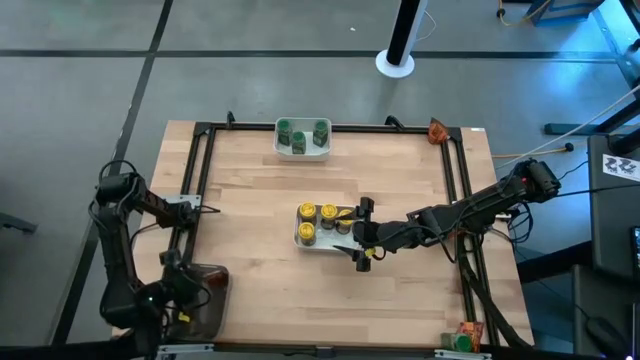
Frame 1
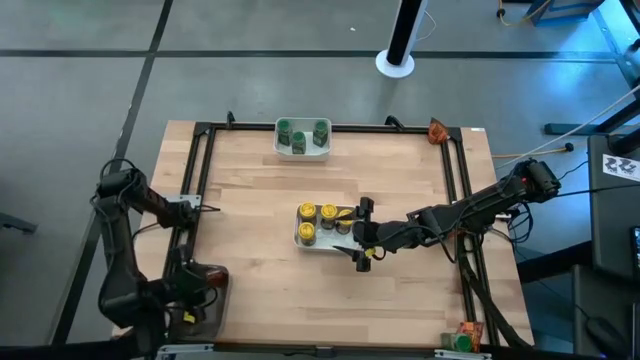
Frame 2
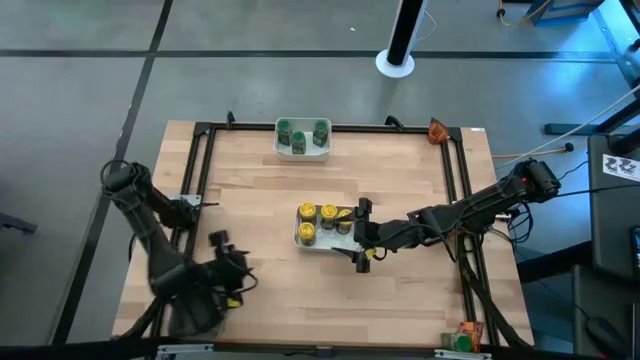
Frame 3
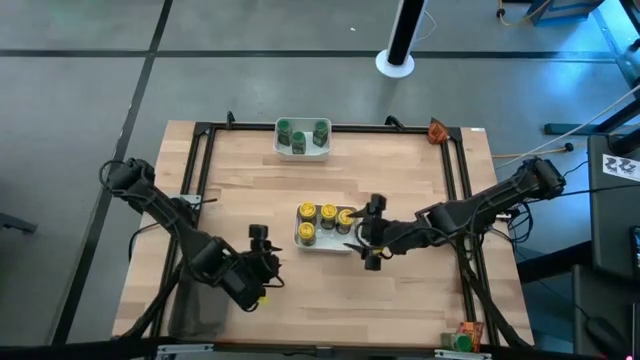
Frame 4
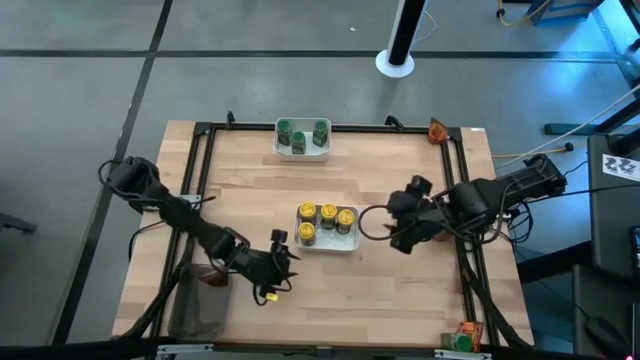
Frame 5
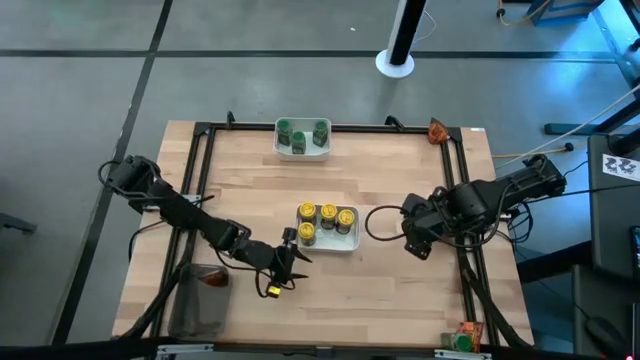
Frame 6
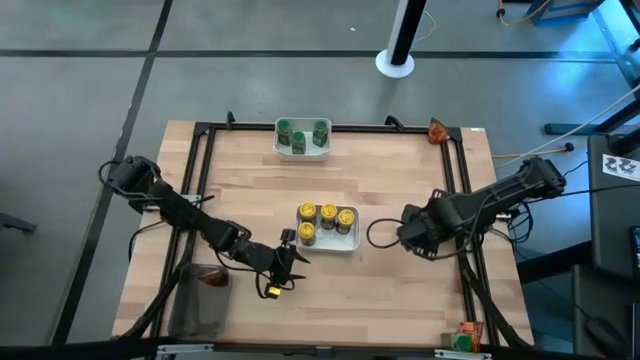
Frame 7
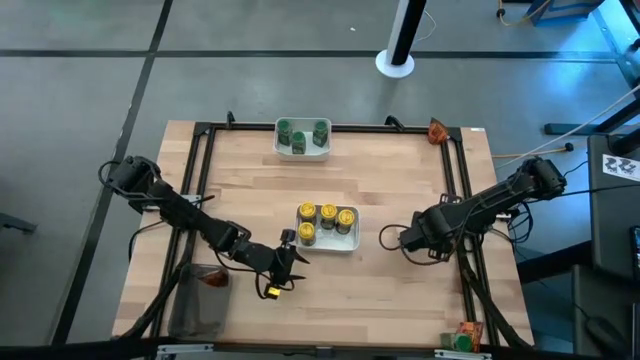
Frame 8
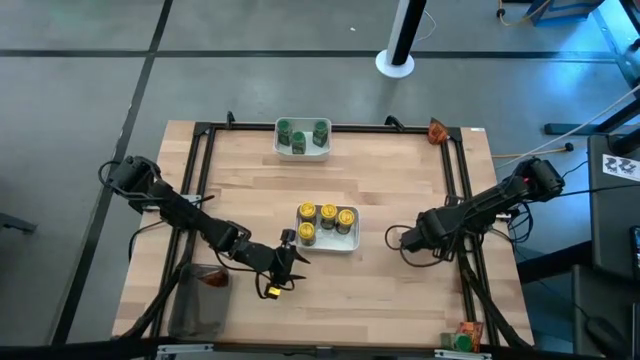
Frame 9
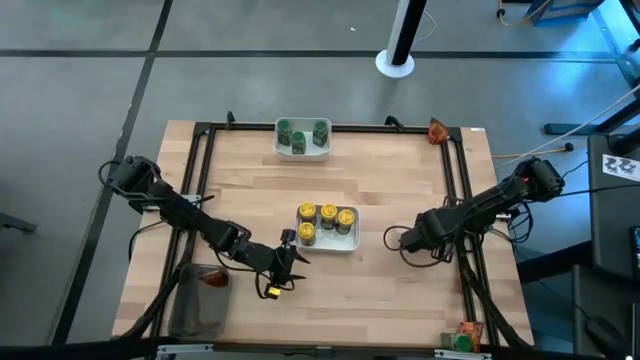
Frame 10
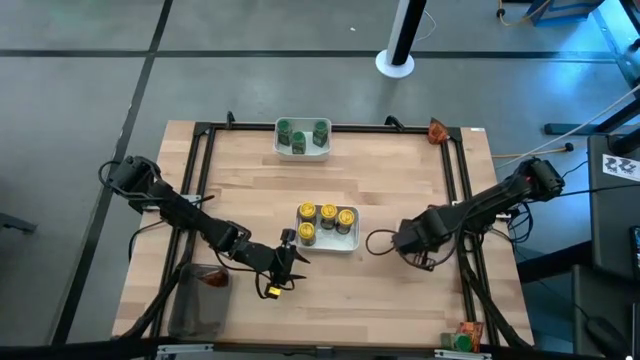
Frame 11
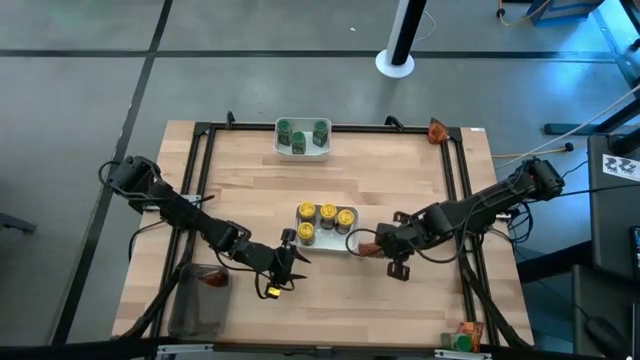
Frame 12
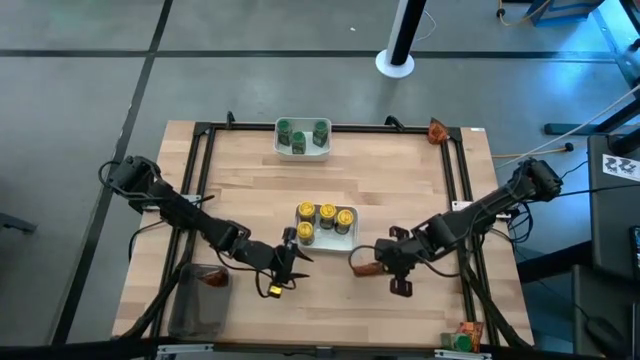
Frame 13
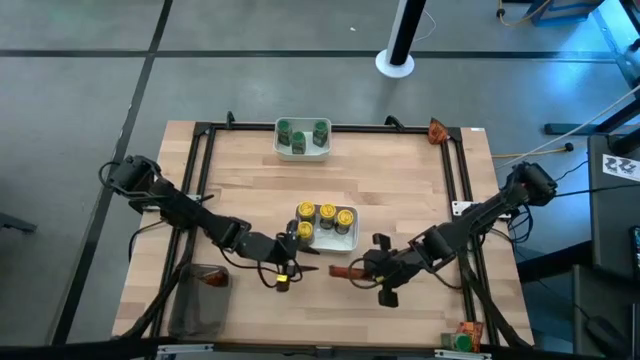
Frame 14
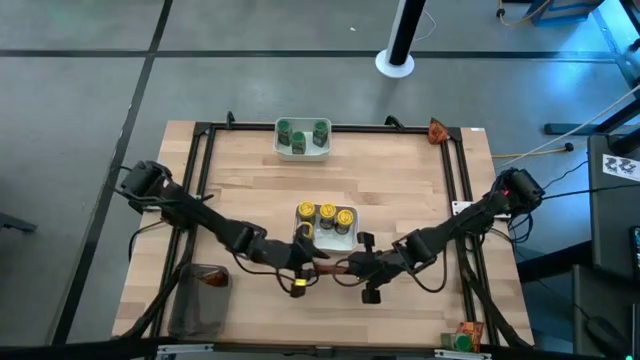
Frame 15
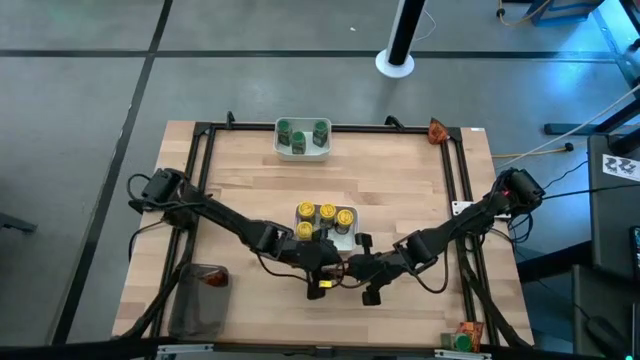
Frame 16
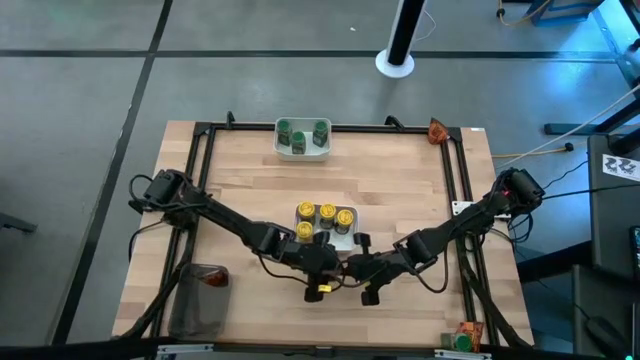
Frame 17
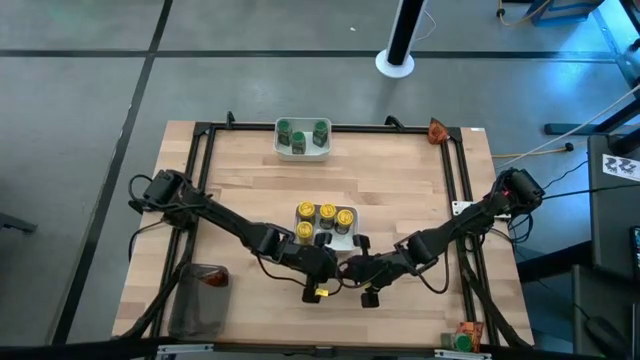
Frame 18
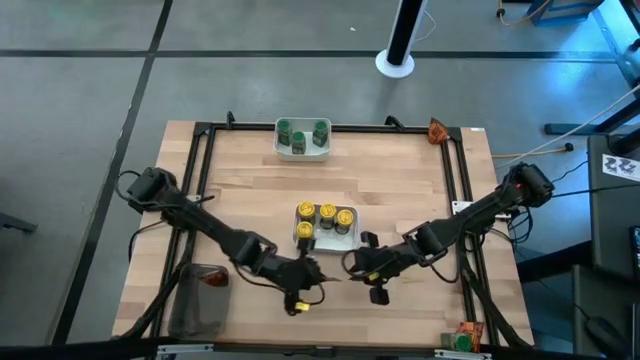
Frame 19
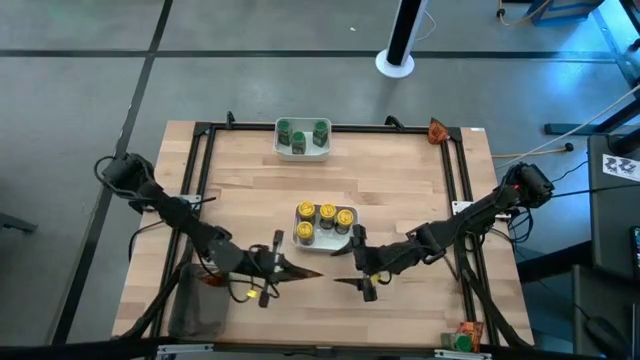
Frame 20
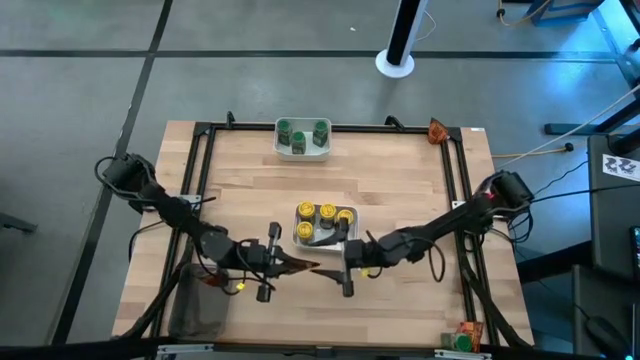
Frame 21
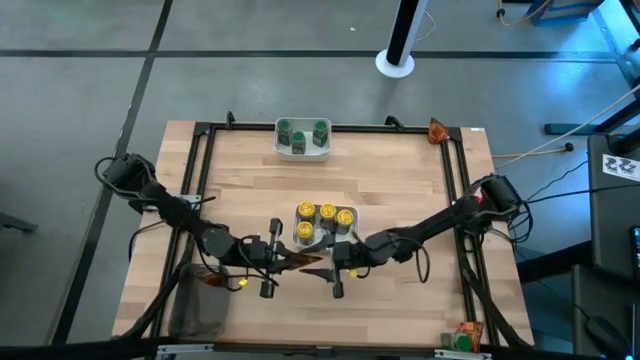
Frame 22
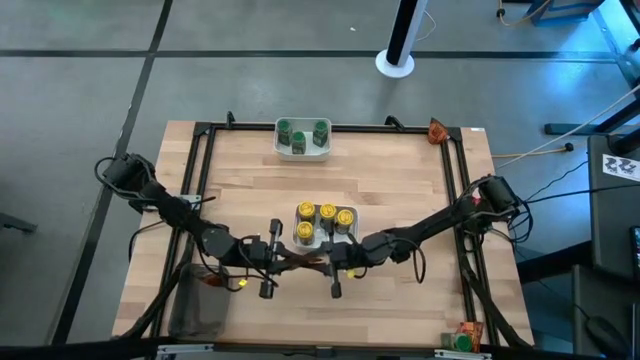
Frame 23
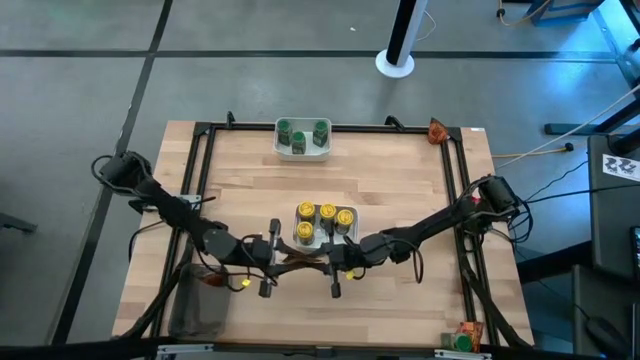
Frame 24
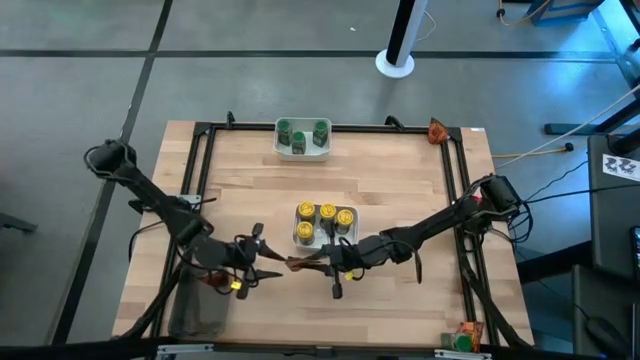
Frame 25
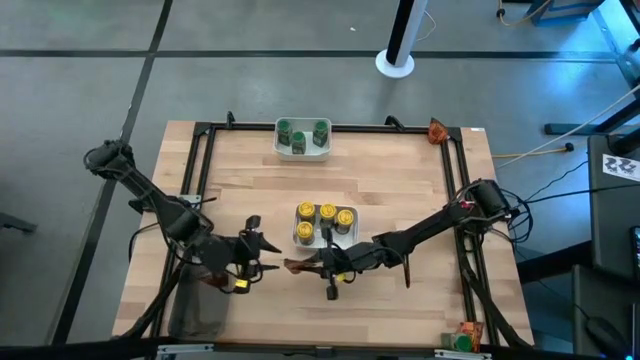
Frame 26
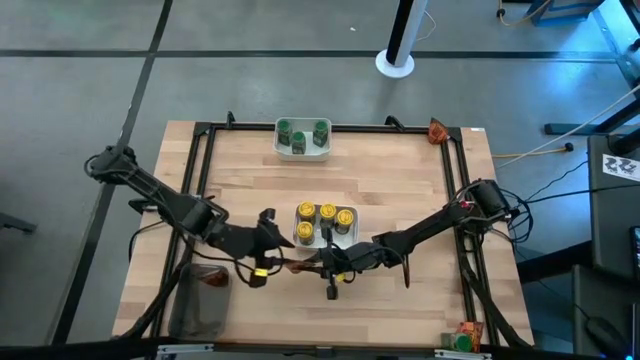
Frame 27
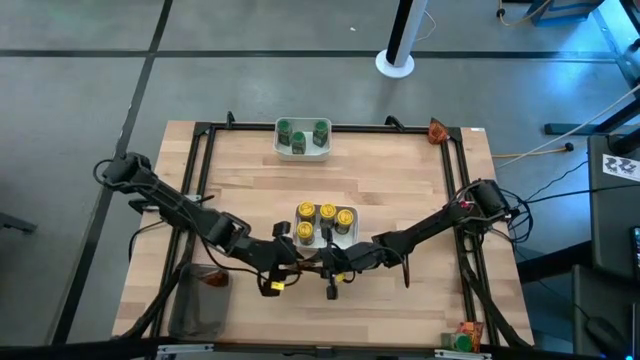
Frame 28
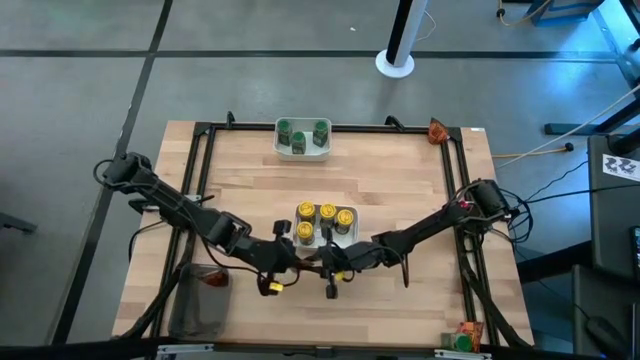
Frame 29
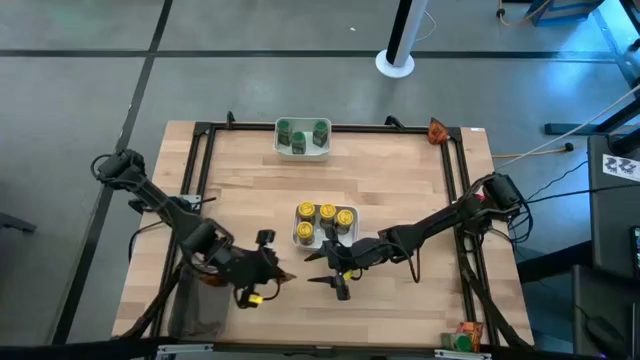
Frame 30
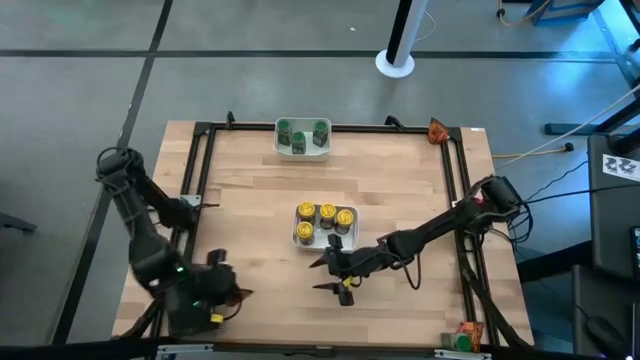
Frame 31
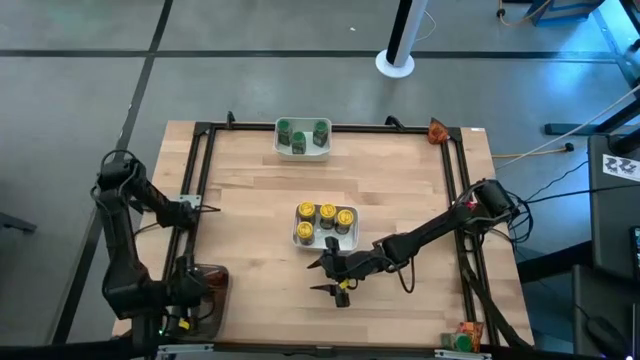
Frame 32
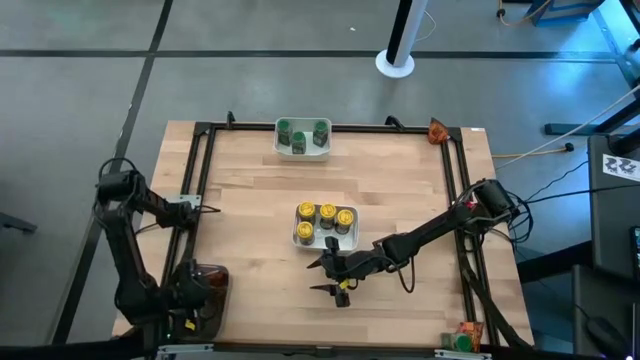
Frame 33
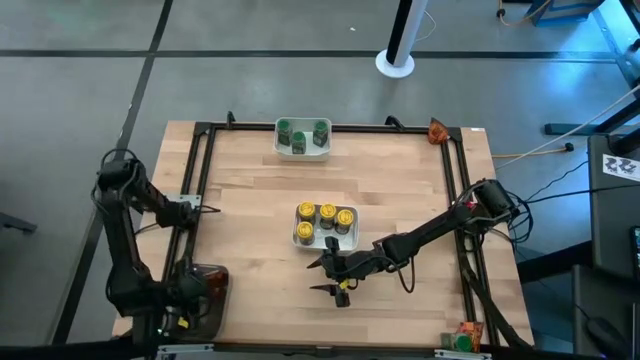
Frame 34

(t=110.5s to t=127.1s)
Task: Sort spices by type
Put the middle right orange seasoning pack into the black bin

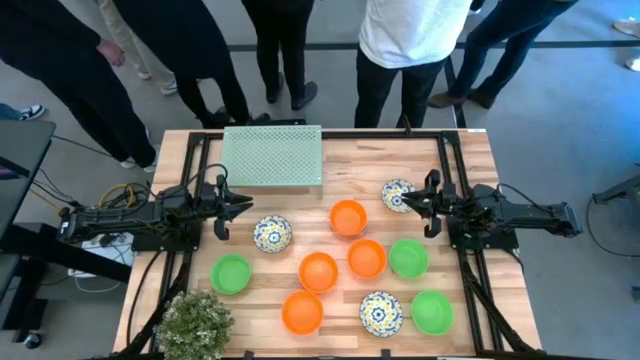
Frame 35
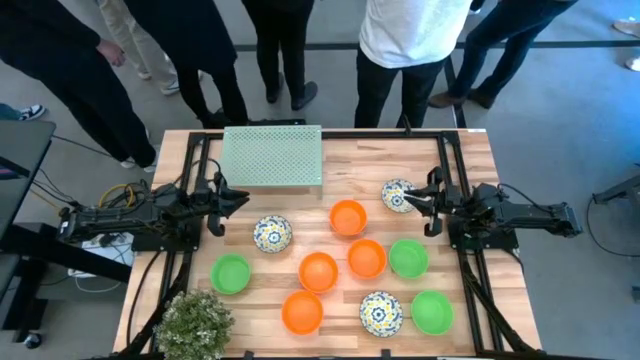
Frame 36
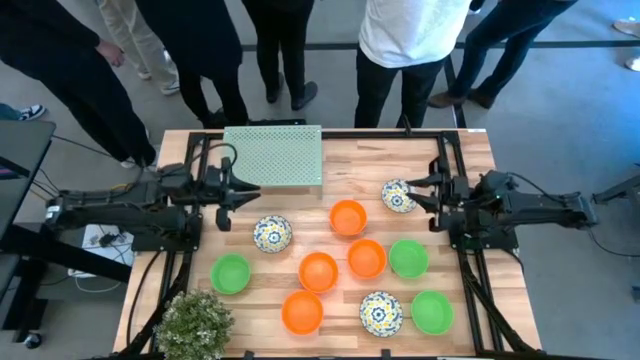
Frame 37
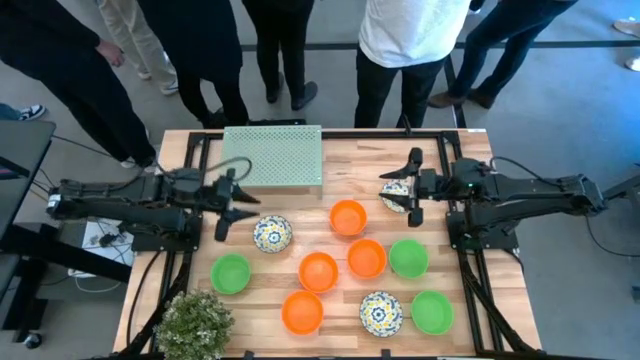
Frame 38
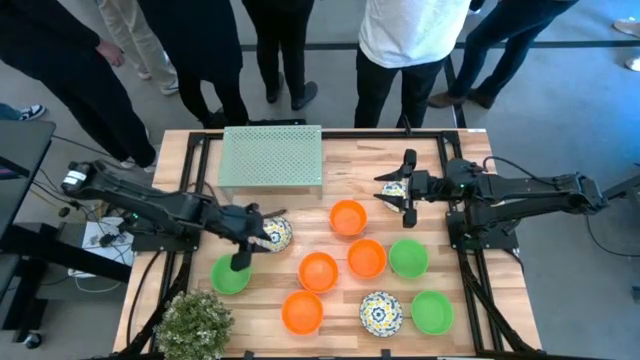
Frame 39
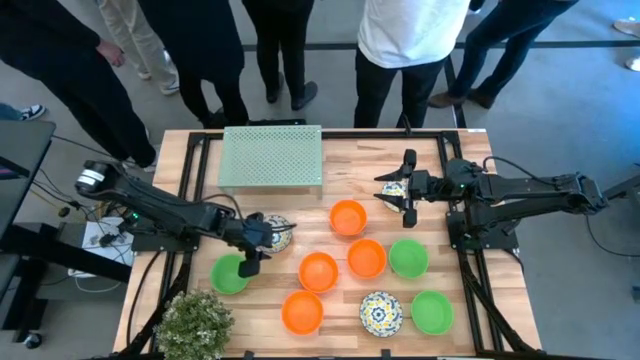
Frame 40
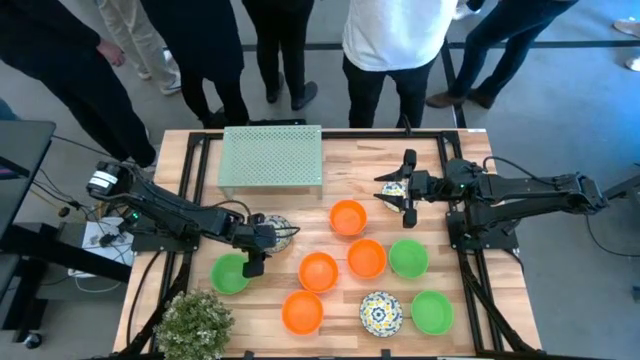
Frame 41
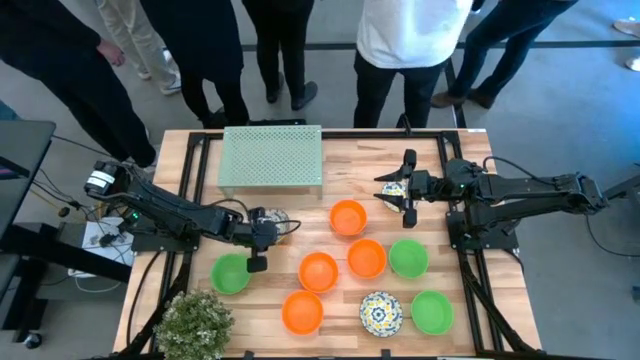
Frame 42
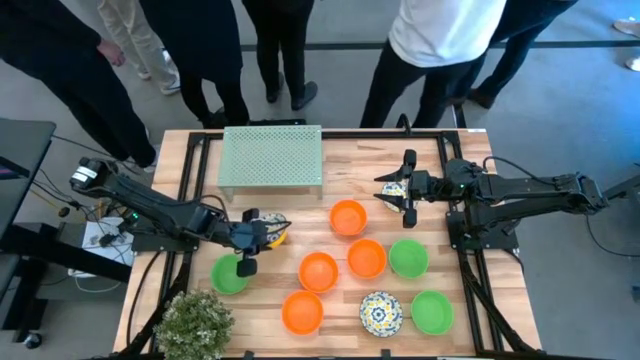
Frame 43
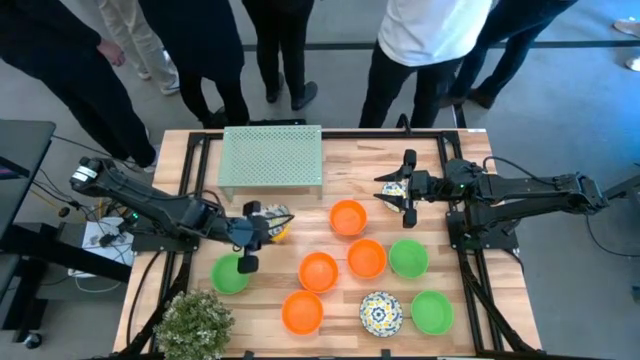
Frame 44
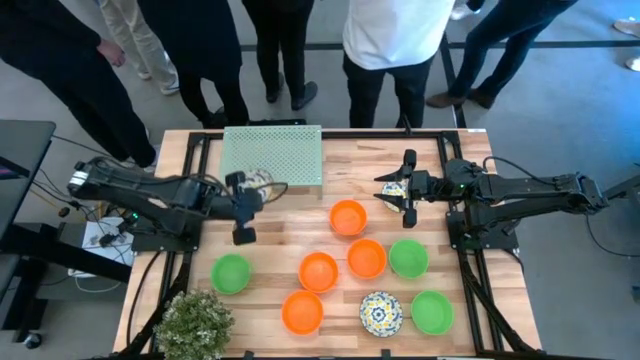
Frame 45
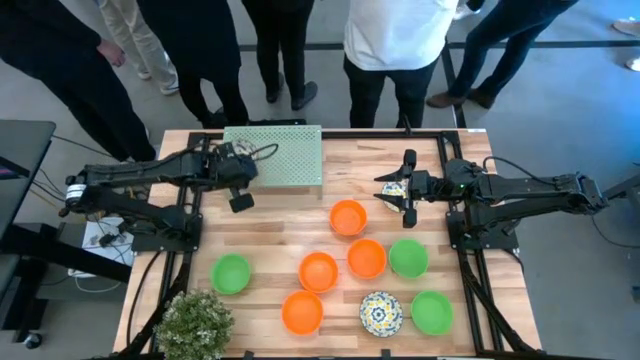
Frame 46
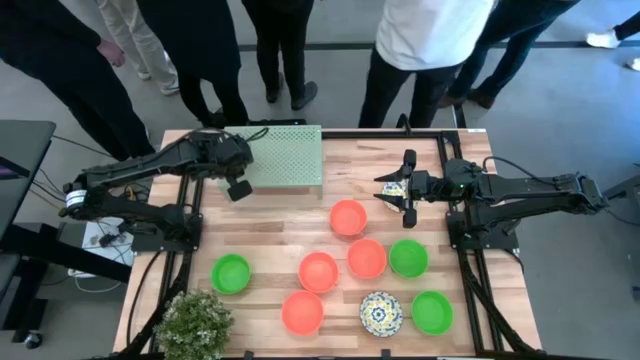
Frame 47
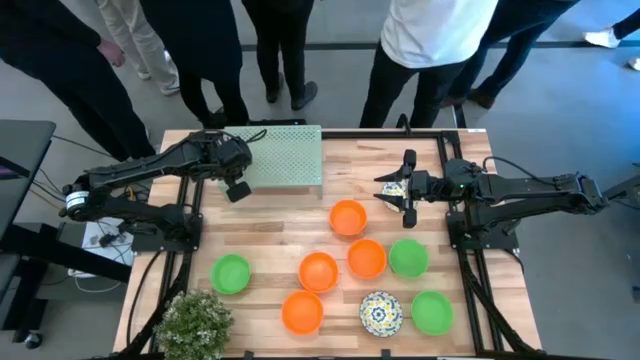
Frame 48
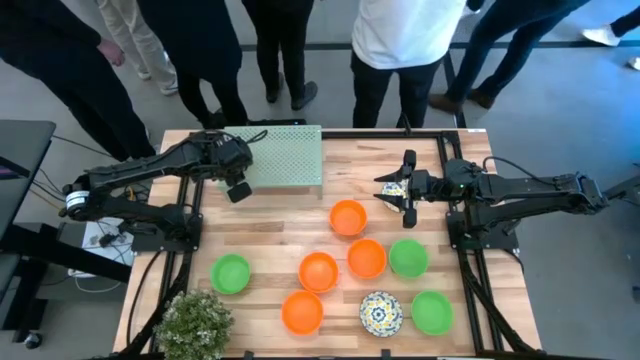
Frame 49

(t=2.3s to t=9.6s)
Task: Pick & Place Mini bowls
Put the white patterned bowl on the shelf
